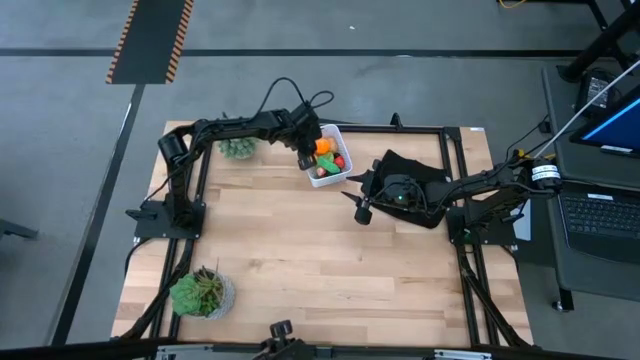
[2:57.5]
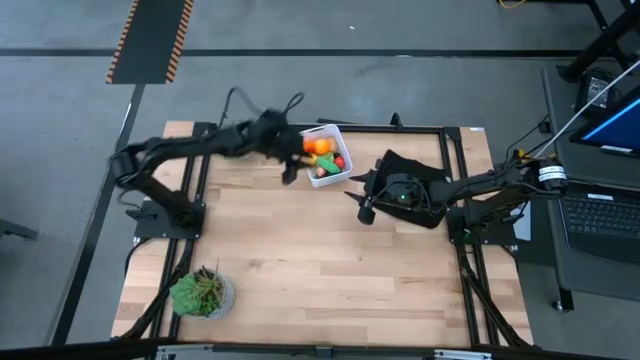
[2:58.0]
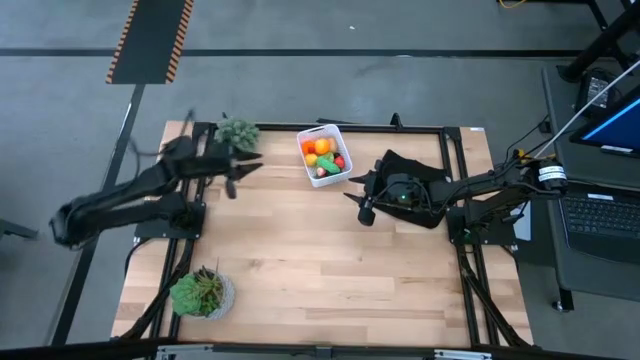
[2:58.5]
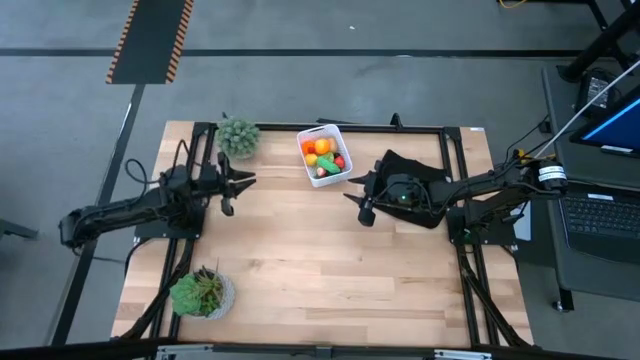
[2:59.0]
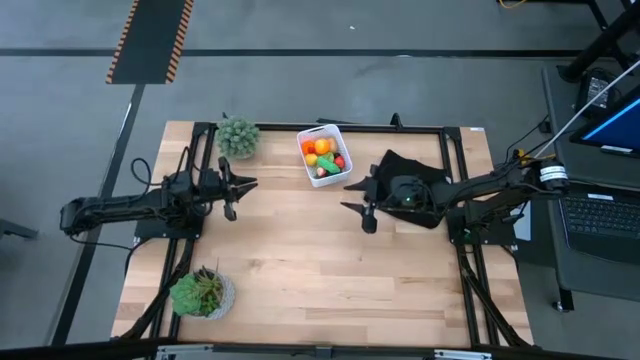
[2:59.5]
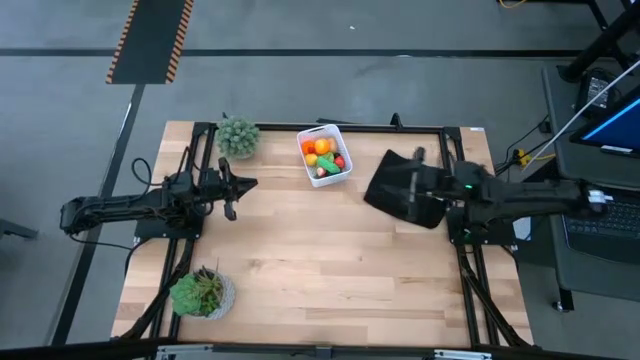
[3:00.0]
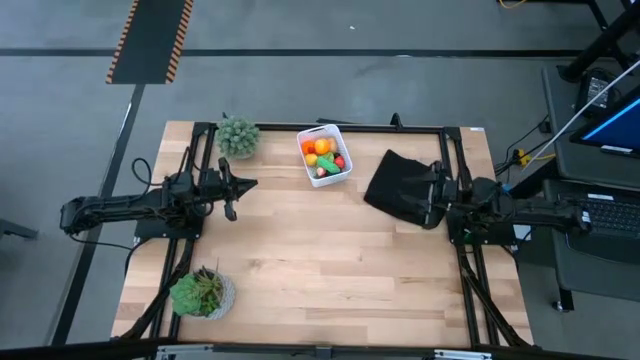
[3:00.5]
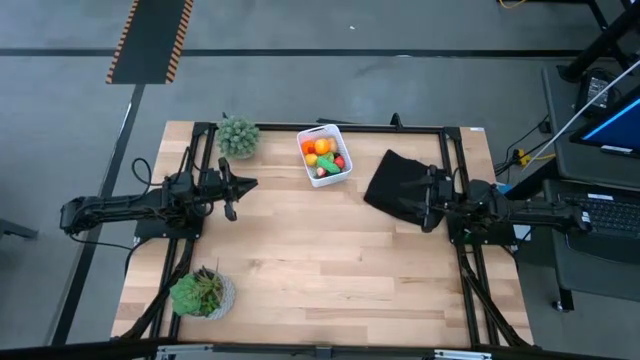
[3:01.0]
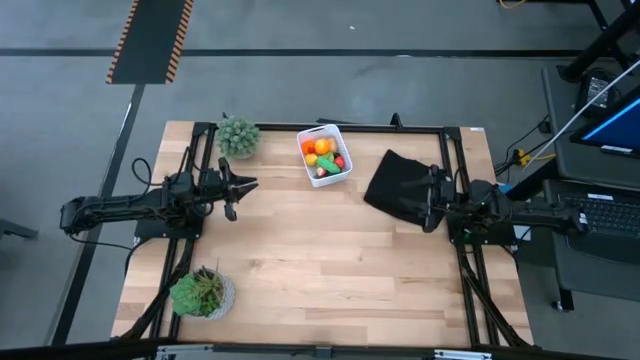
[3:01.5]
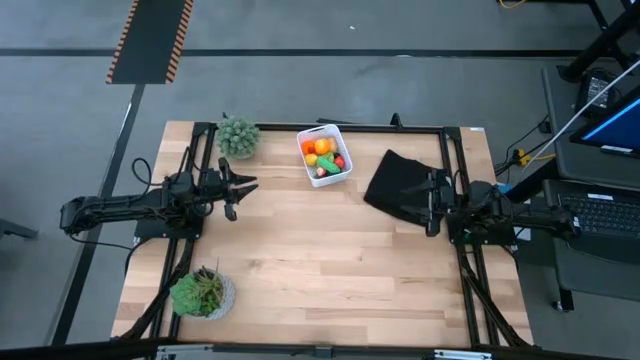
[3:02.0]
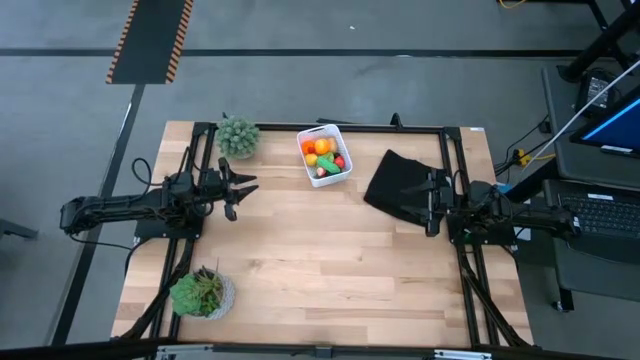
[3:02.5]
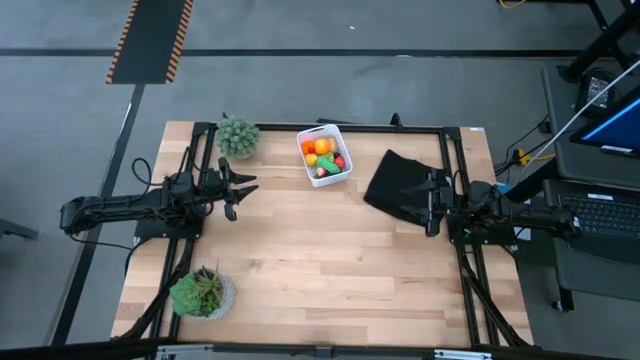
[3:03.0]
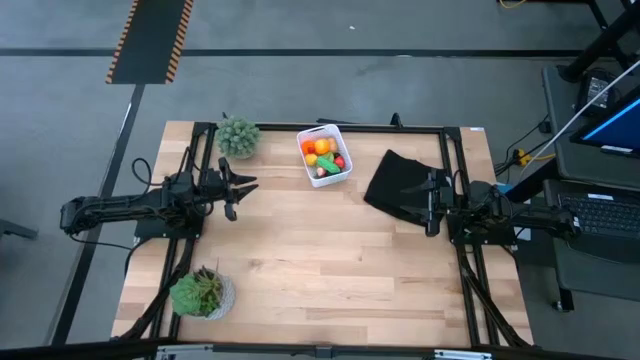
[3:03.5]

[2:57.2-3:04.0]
Task: Pick and placing Produce into tupperware
Return to Home Position

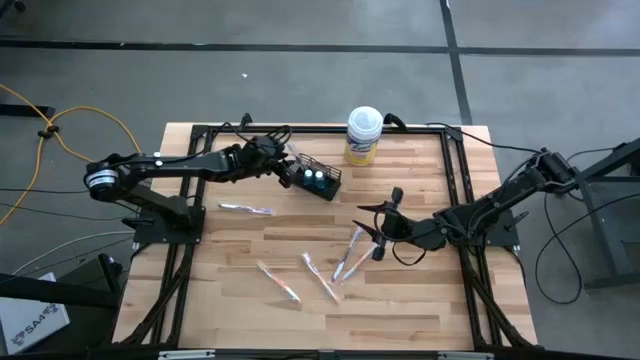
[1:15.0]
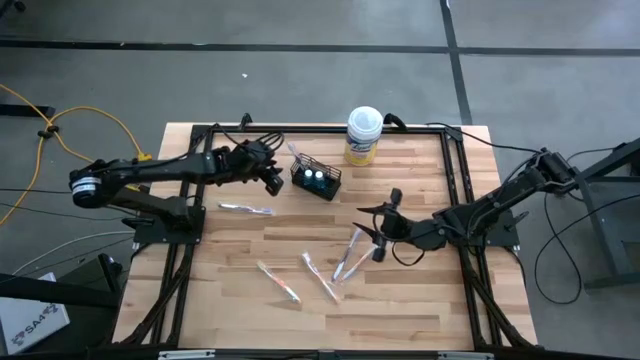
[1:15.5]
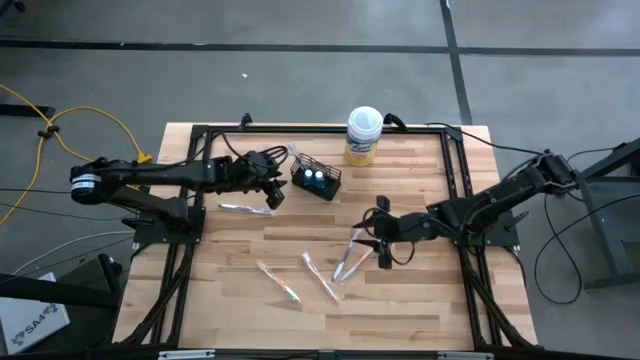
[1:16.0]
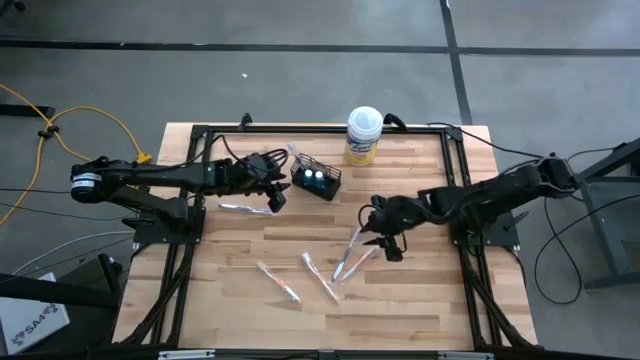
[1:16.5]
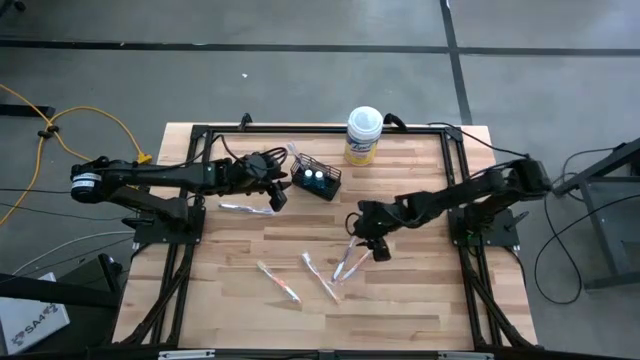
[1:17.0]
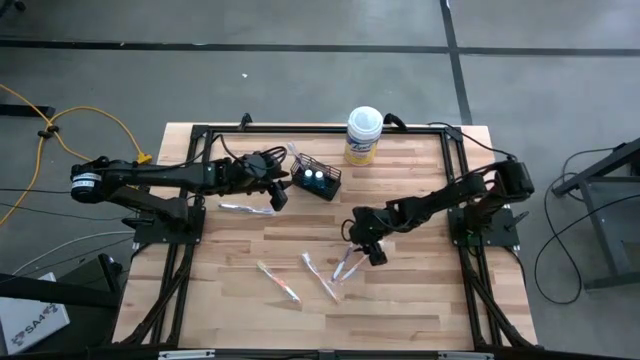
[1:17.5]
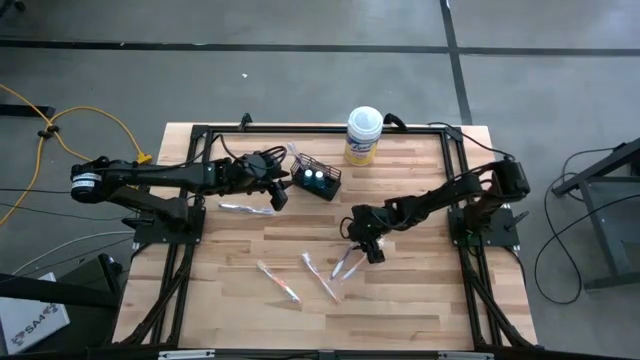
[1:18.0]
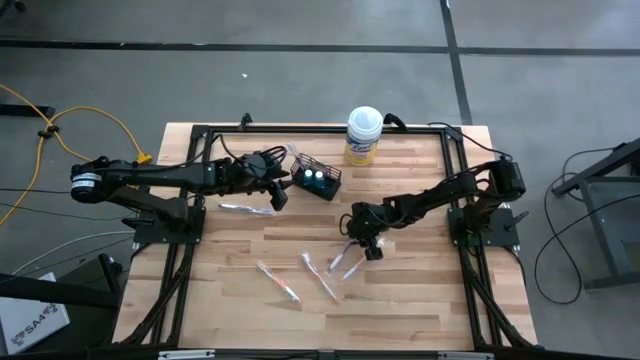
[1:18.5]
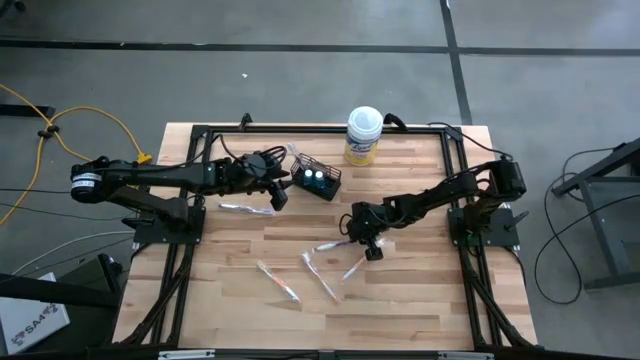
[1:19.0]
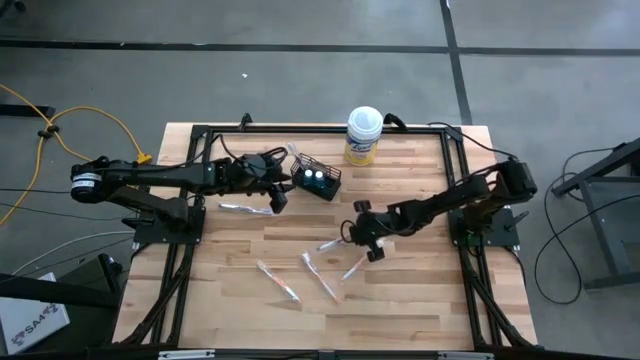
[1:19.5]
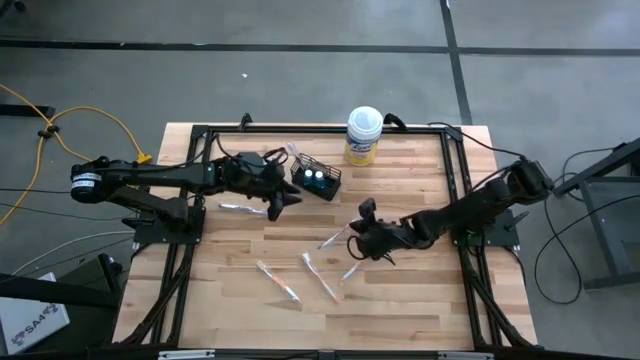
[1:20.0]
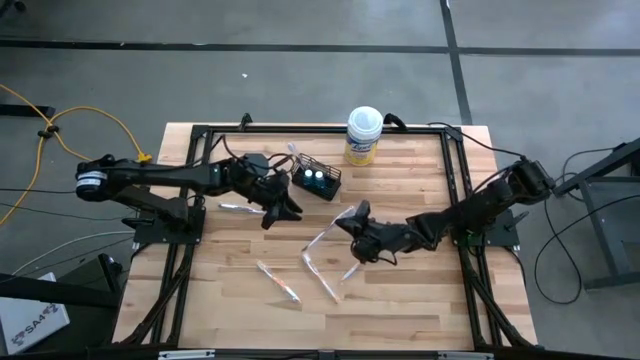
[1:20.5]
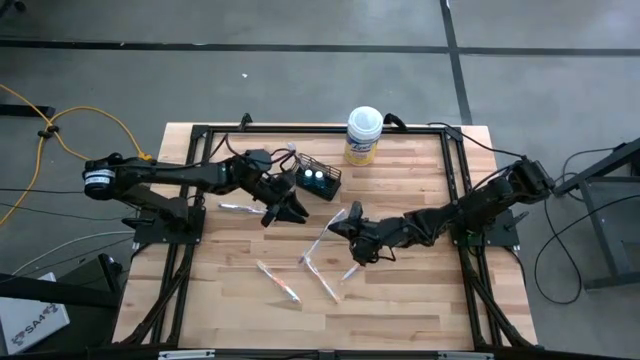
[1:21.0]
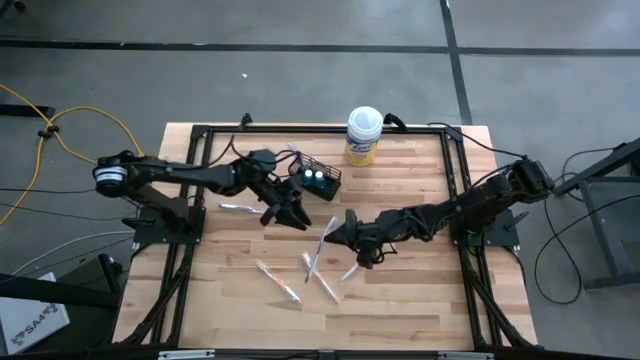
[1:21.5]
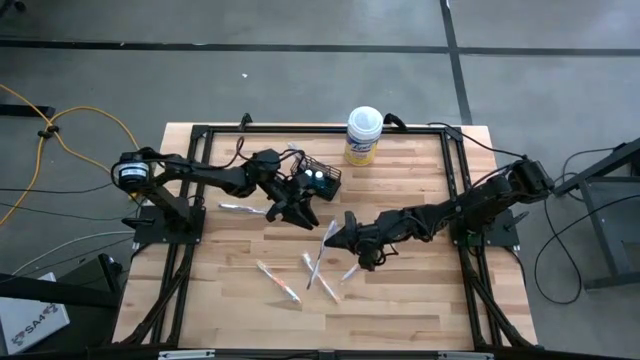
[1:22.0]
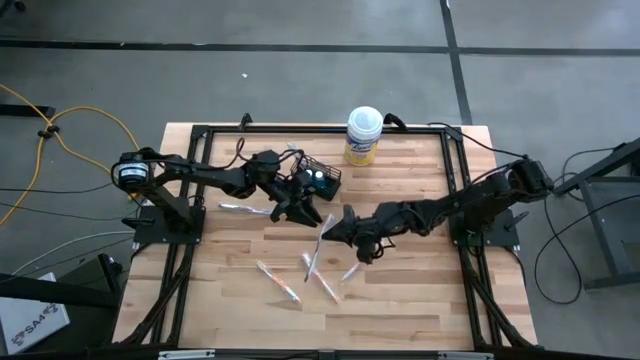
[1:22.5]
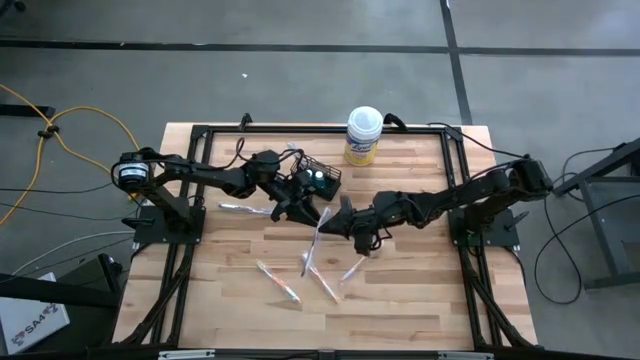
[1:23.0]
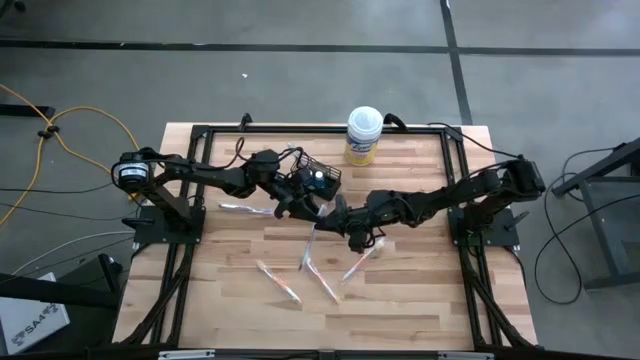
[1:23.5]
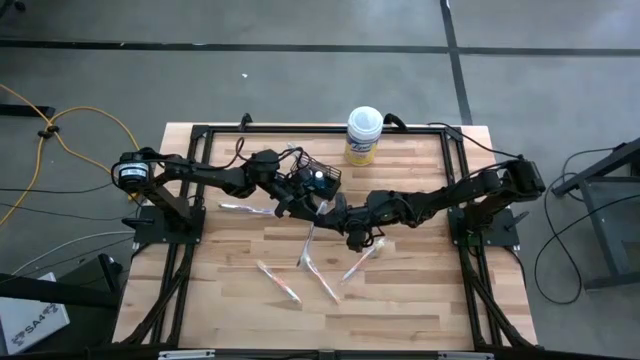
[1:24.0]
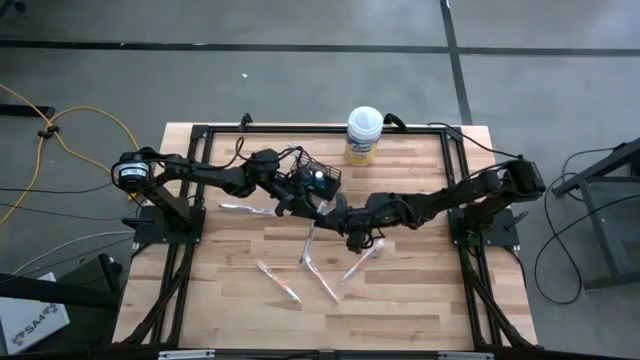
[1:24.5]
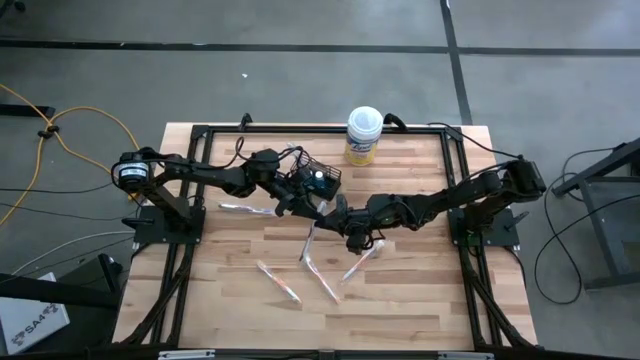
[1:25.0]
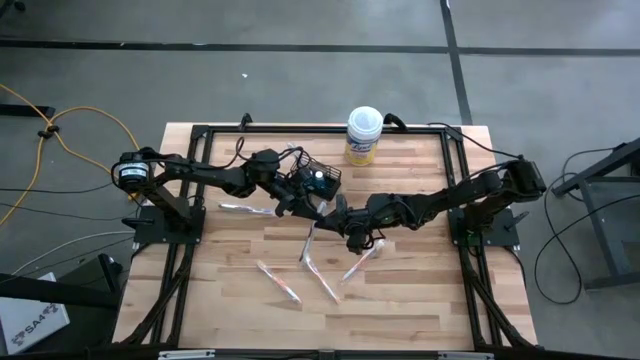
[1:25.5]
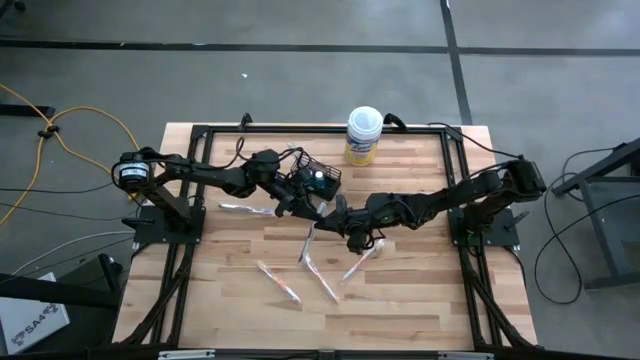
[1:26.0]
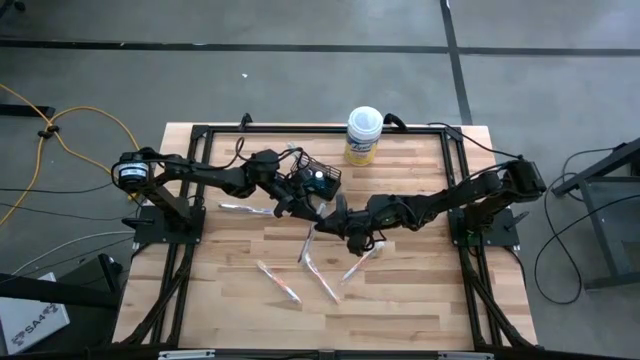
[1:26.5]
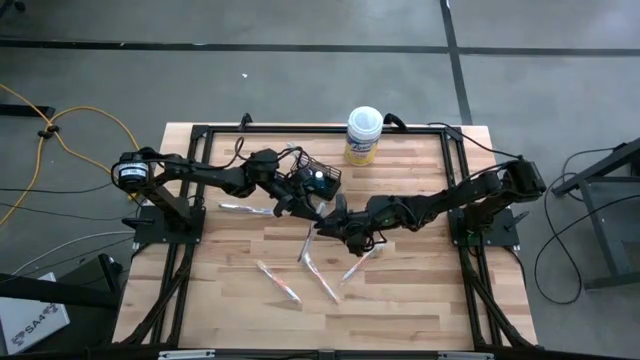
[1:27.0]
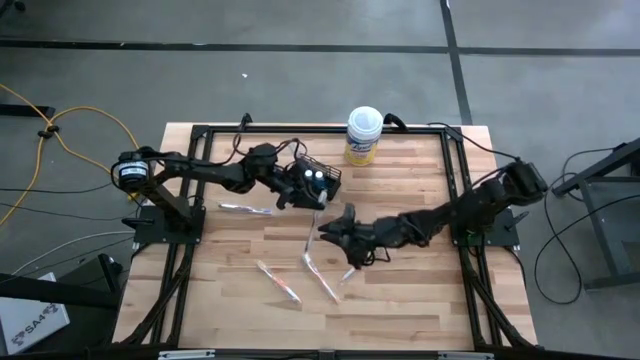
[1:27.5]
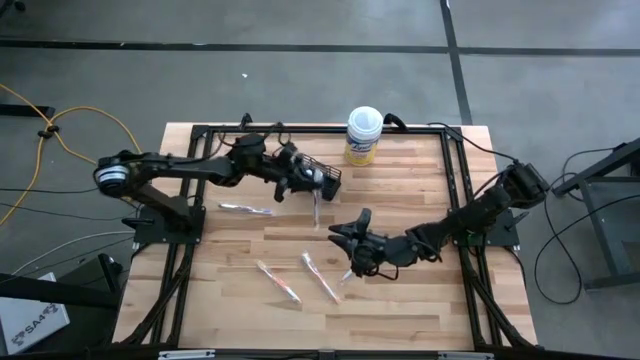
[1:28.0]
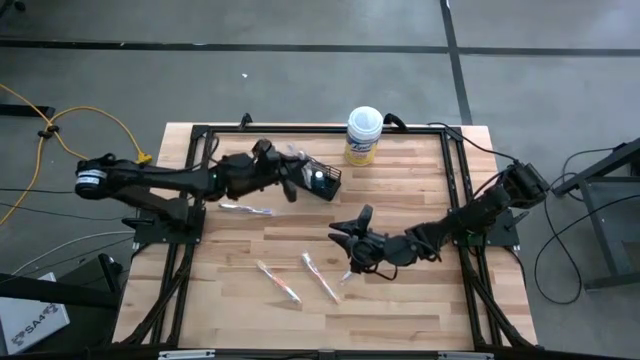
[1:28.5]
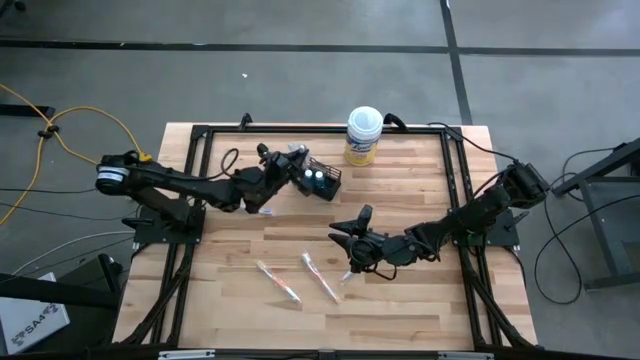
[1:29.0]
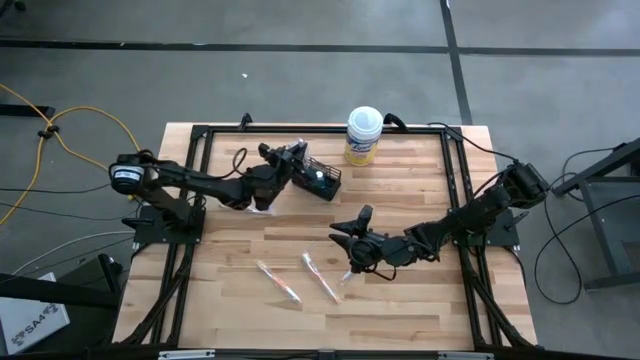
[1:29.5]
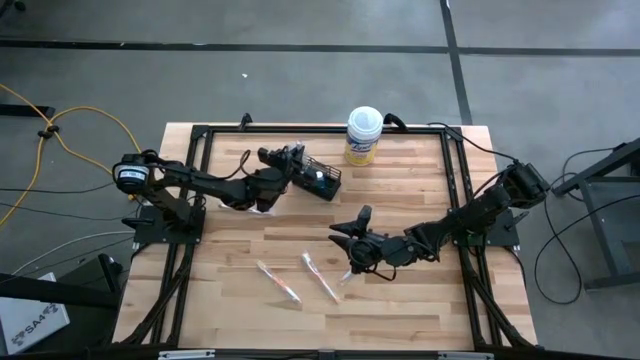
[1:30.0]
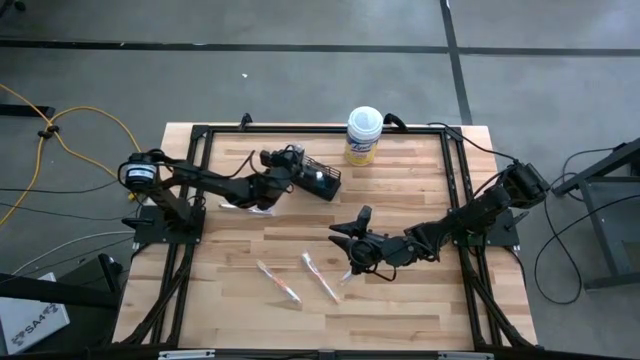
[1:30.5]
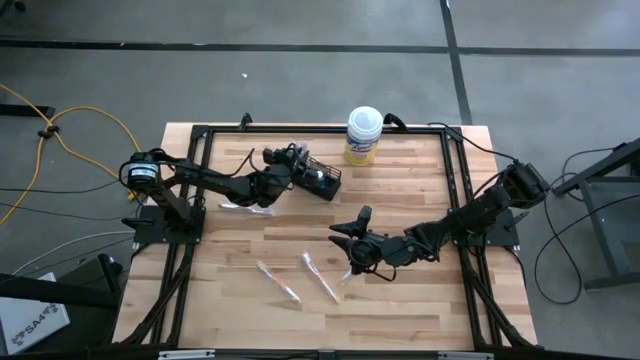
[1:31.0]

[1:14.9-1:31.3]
Task: Pick & Place toothbrushing station
Put the bottom violet toothbrush into the black mesh organizer
